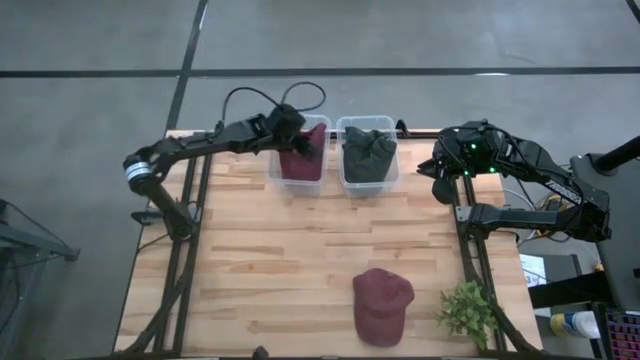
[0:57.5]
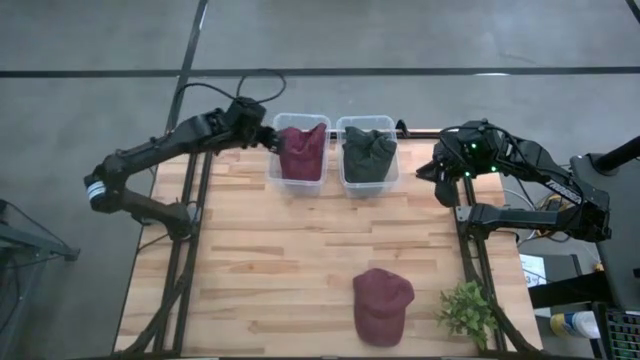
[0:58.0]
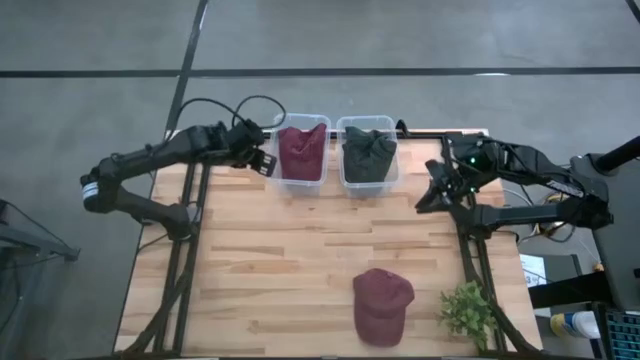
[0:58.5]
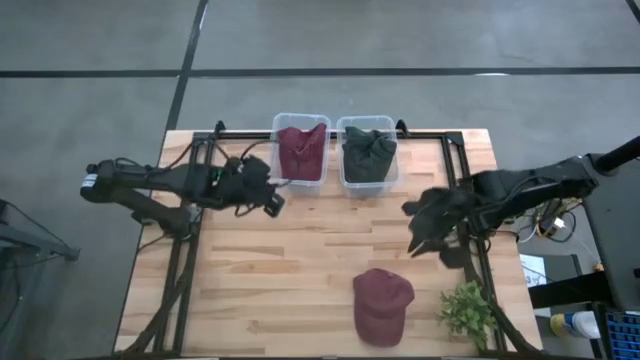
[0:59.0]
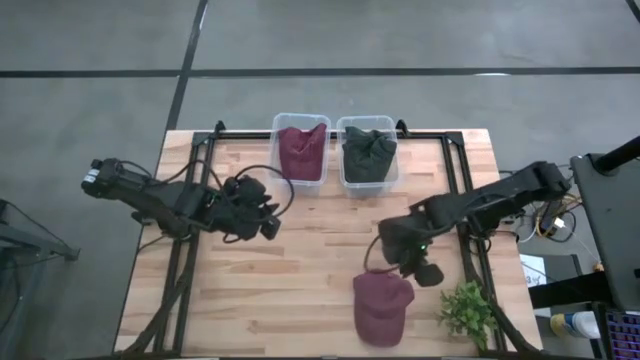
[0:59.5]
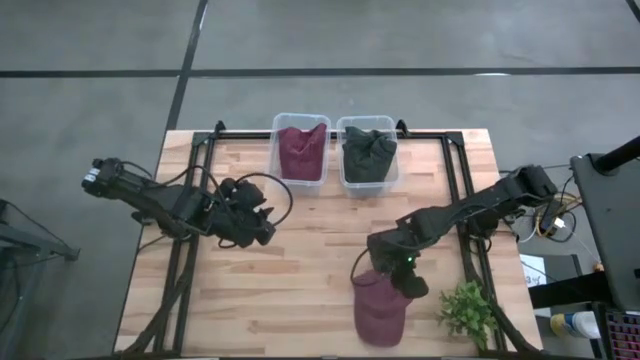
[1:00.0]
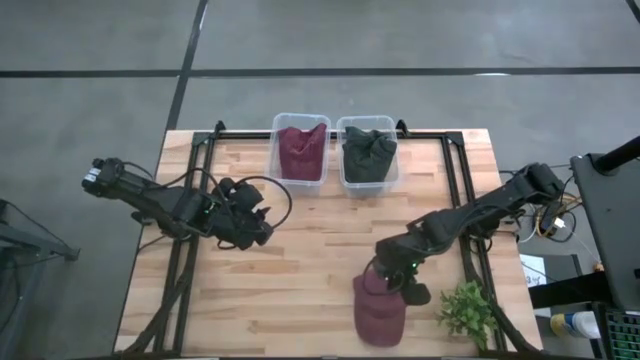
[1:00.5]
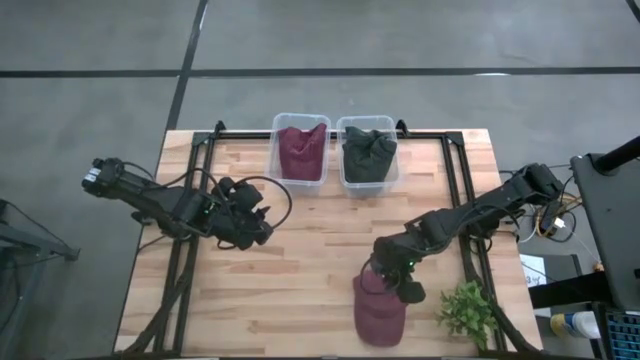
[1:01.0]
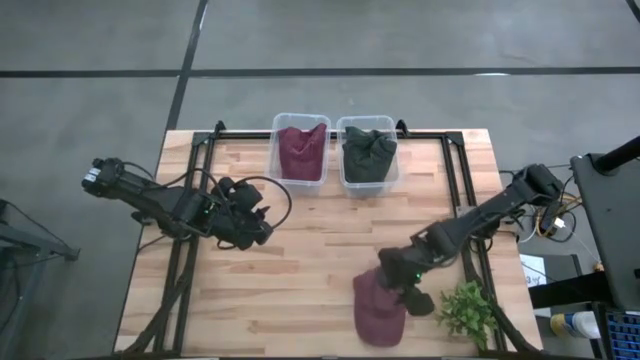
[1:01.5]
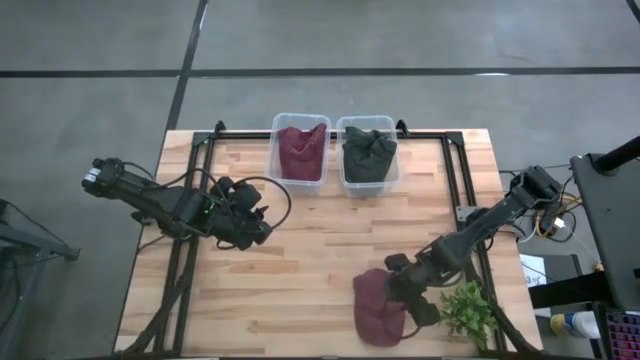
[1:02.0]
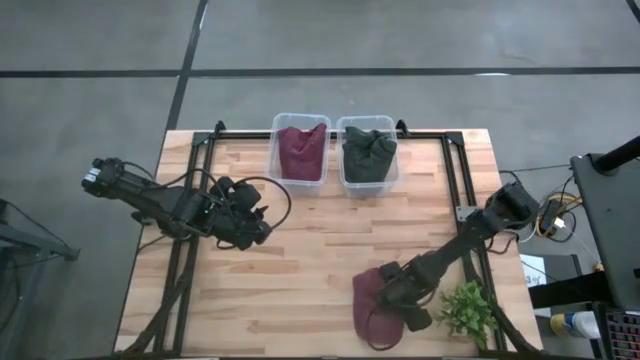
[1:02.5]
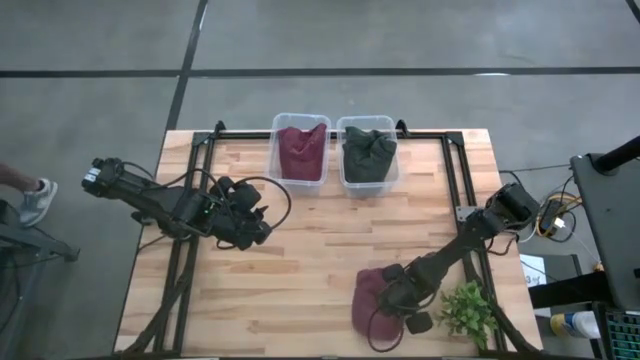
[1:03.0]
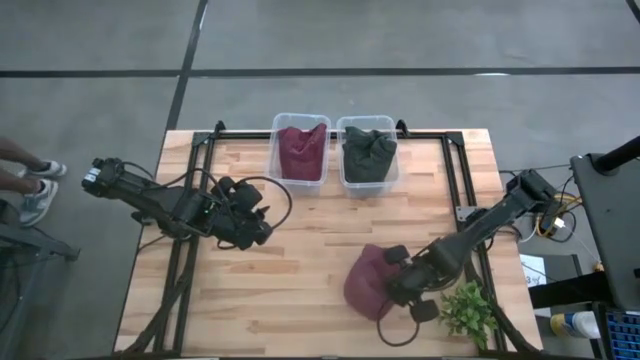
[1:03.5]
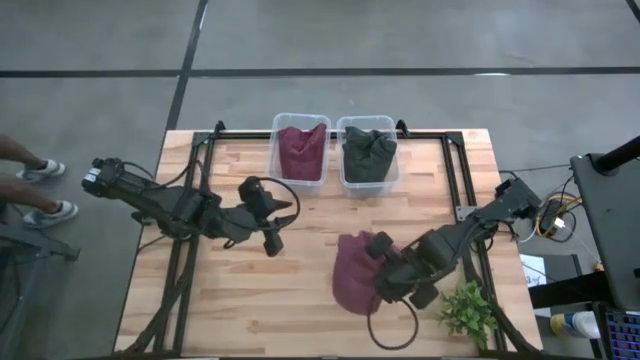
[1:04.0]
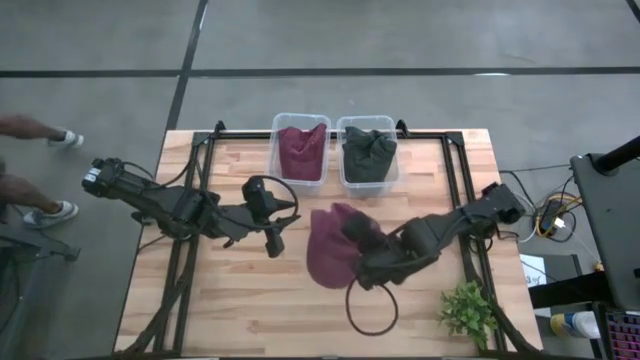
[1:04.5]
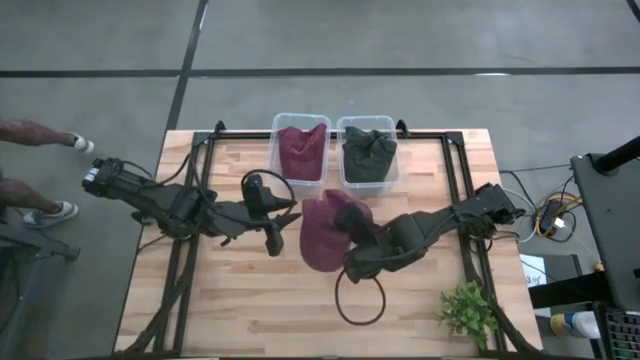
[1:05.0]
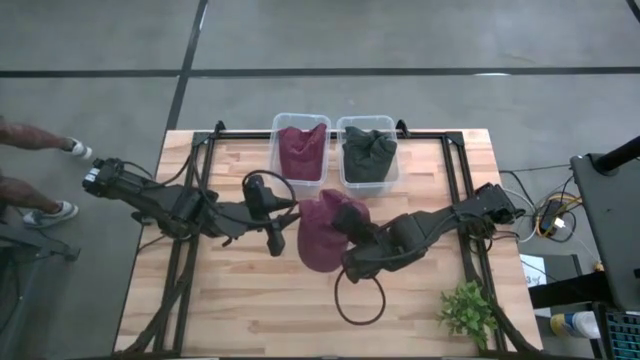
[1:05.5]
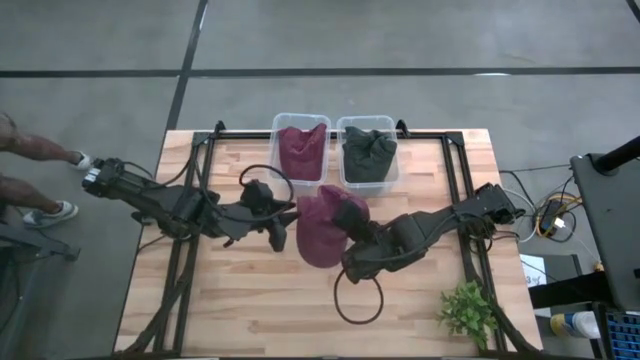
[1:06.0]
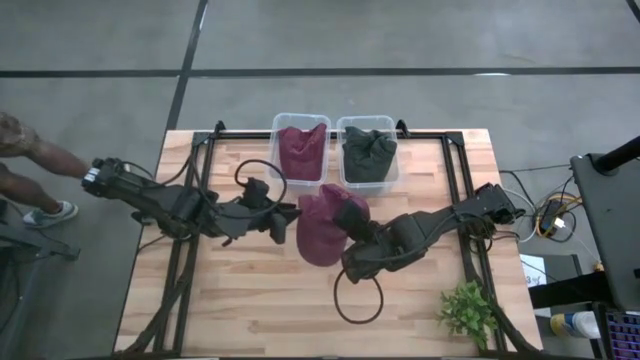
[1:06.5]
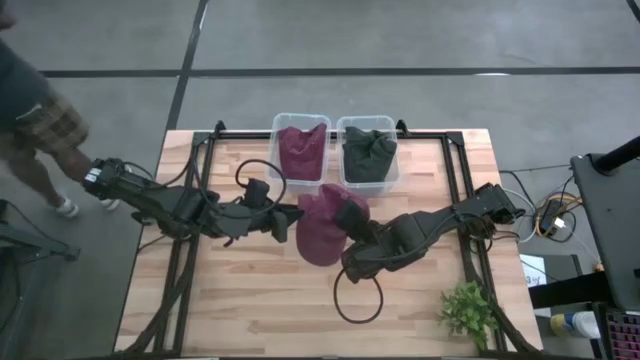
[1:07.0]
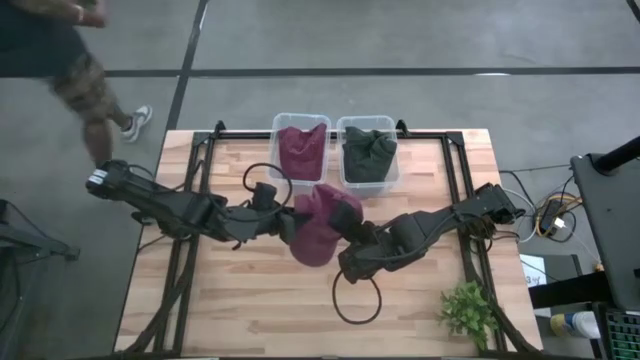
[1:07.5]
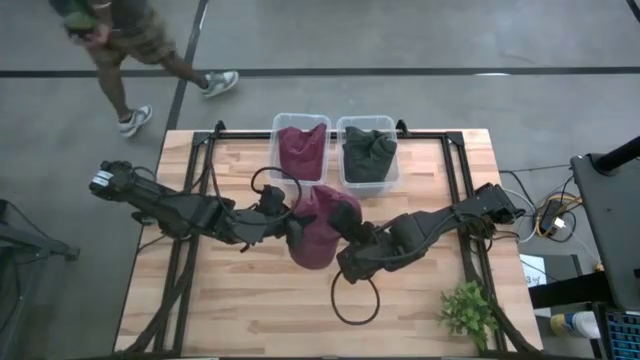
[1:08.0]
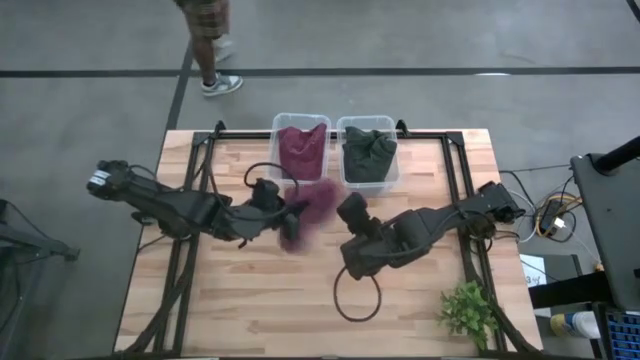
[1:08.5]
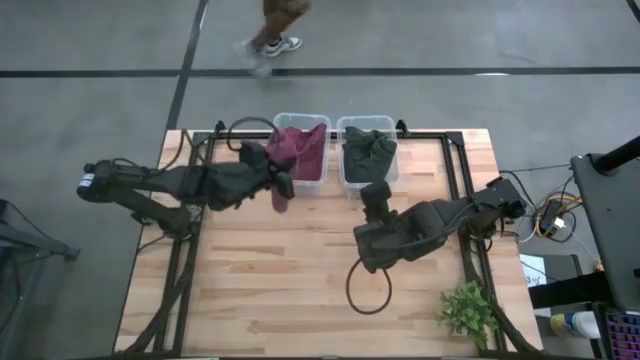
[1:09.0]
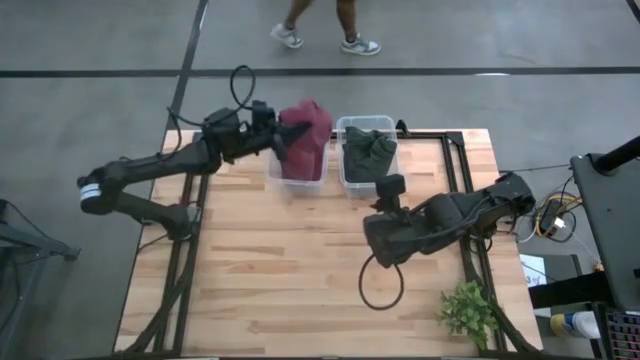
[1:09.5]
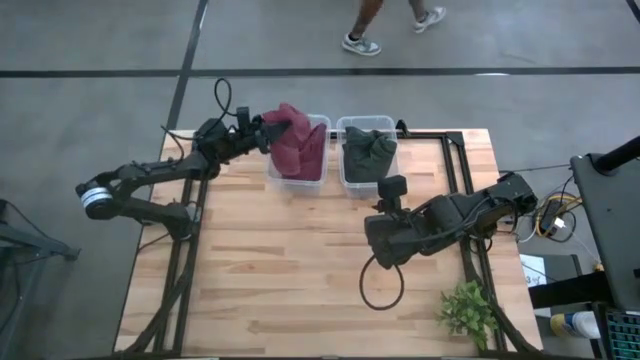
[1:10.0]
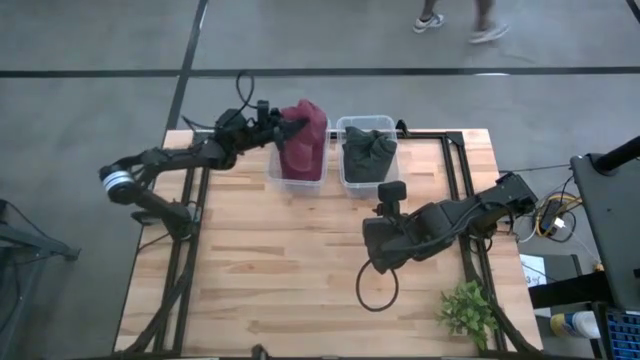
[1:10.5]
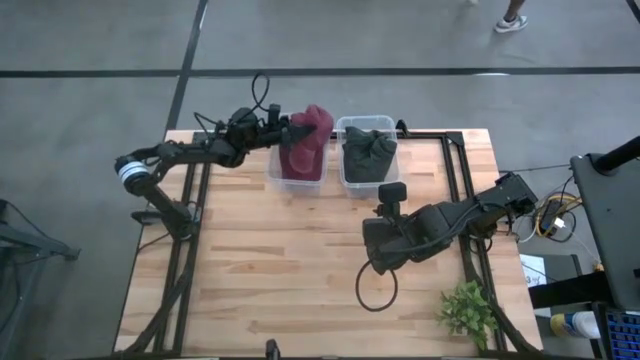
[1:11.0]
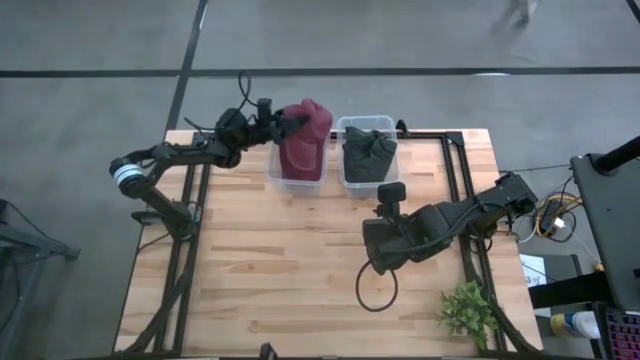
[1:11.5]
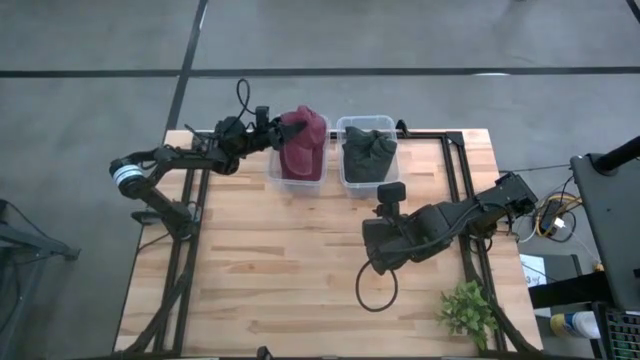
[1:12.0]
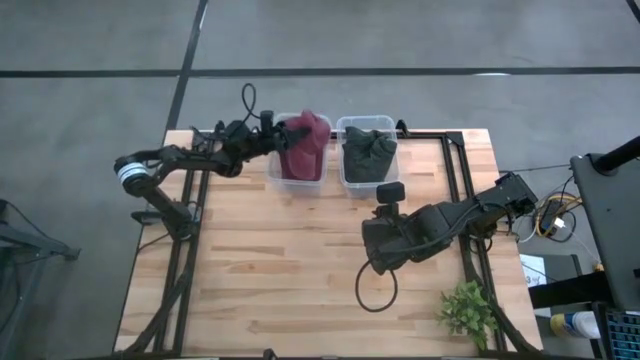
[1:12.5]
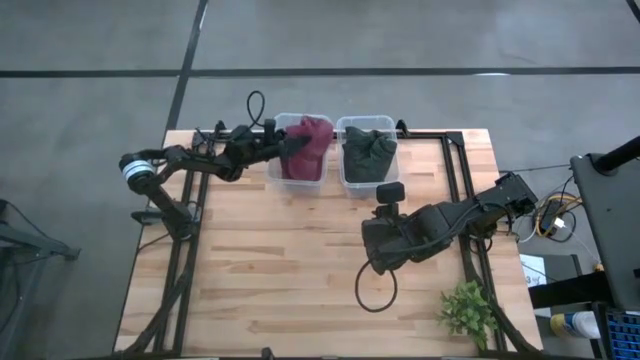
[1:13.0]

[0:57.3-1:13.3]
Task: Pick & Place hat
Put the red cap into the left transparent bin

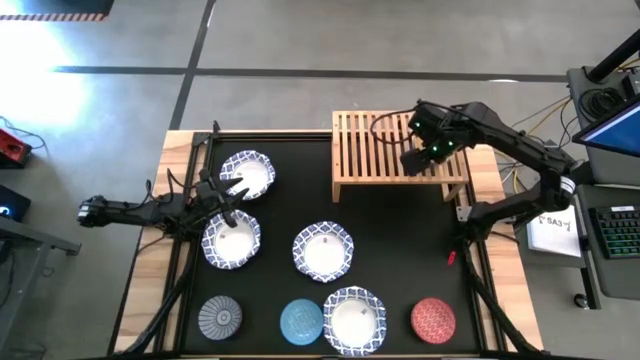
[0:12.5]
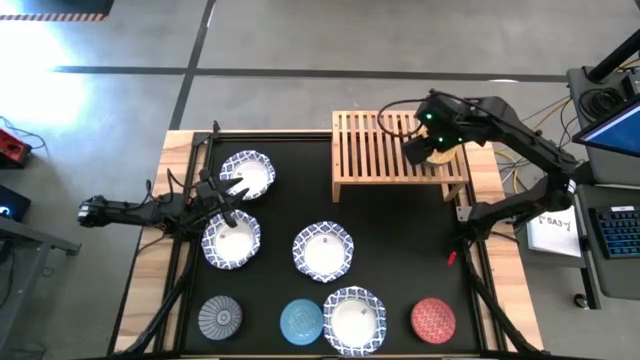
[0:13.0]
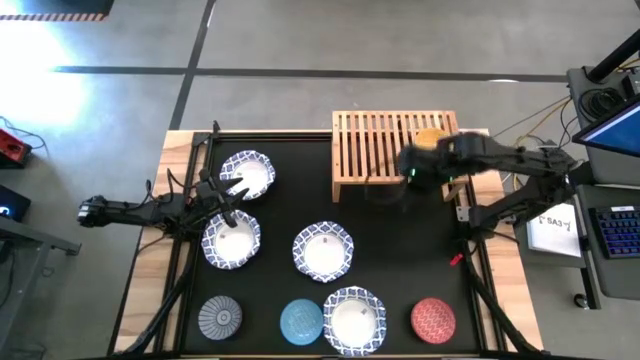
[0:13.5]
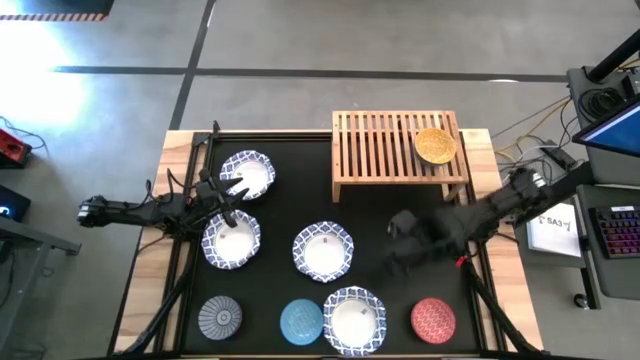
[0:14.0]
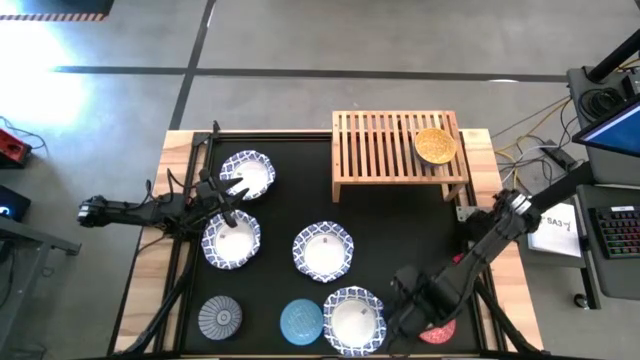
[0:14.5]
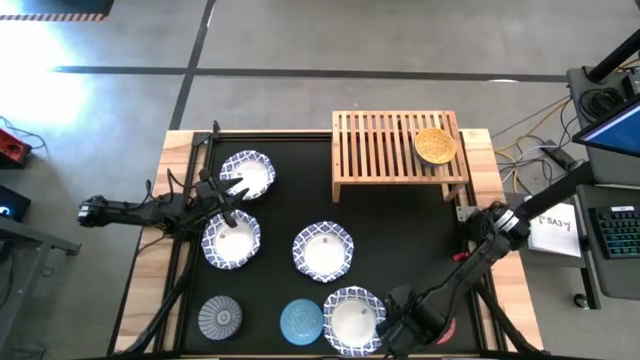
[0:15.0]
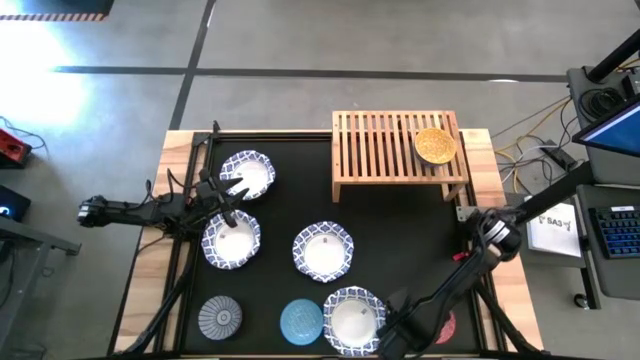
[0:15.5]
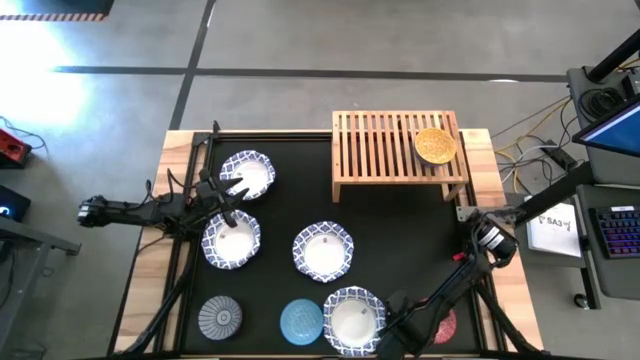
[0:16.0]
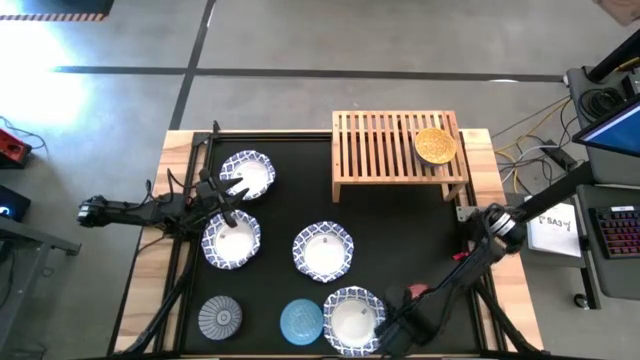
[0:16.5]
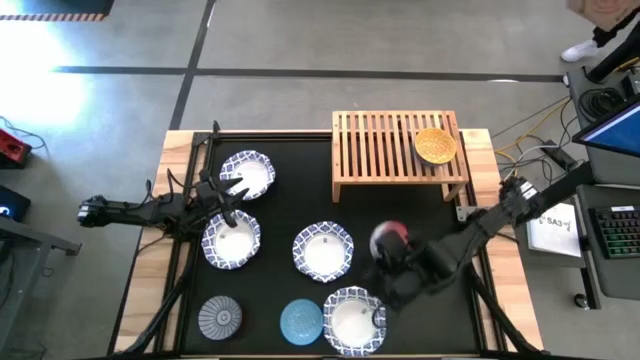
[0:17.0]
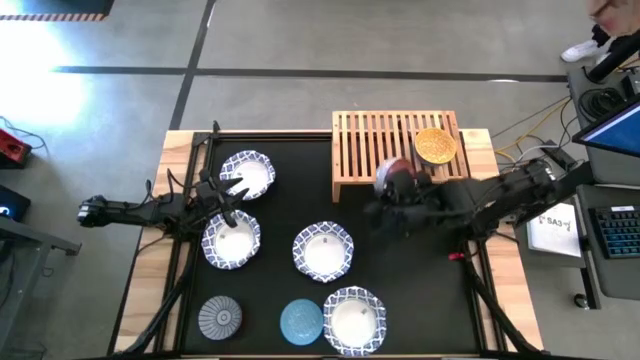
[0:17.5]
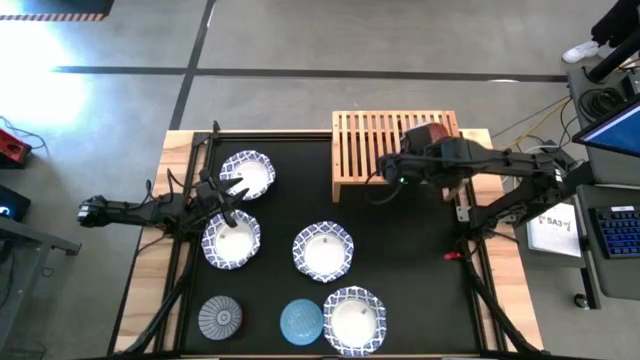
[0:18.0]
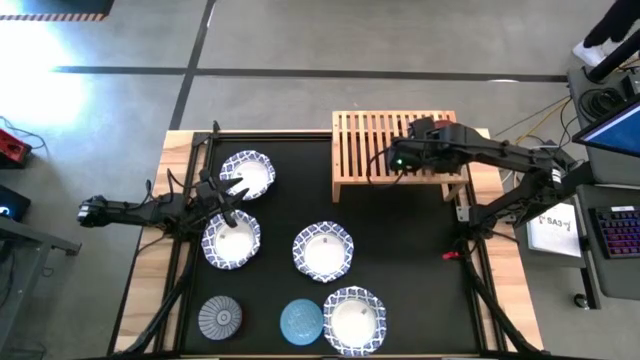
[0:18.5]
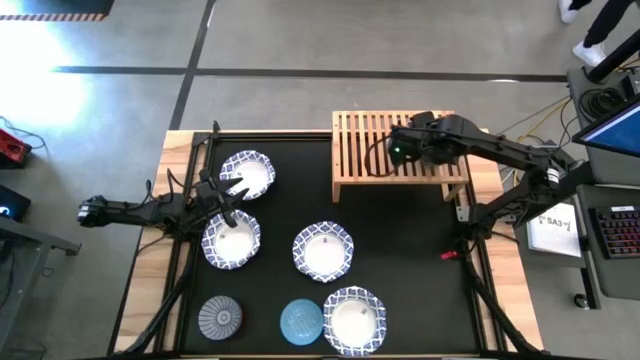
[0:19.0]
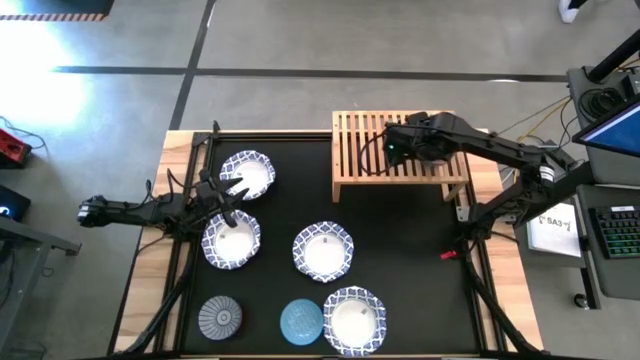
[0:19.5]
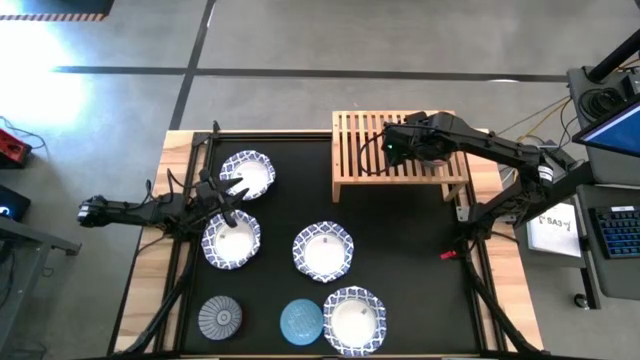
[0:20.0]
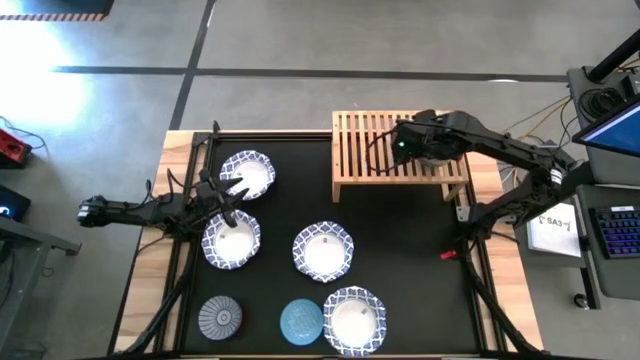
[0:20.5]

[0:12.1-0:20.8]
Task: Place and stack bowls onto a shelf
Stack the red bowl on top of the yellow bowl on the shelf
